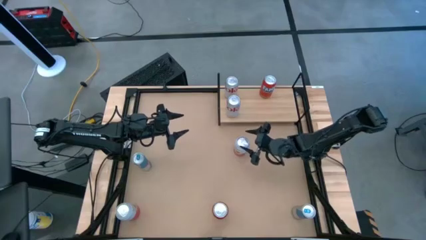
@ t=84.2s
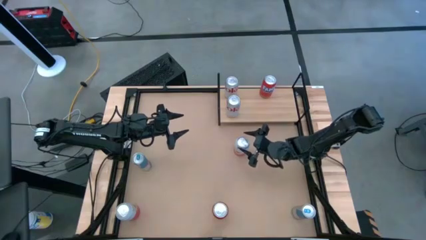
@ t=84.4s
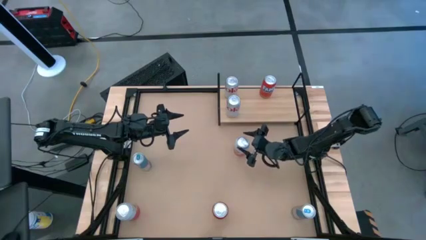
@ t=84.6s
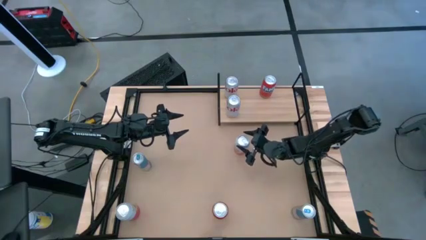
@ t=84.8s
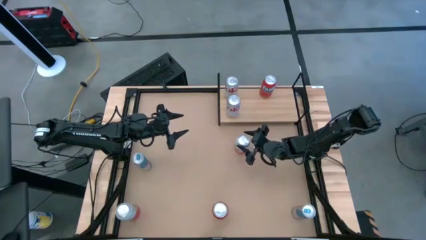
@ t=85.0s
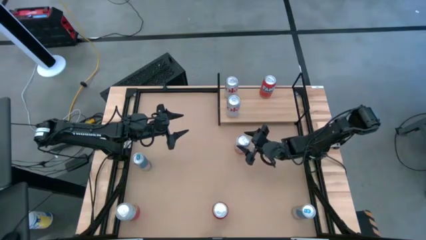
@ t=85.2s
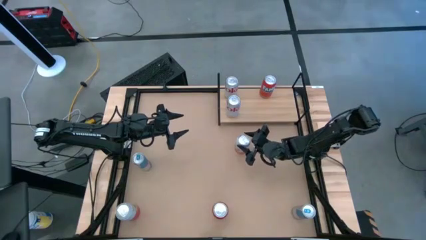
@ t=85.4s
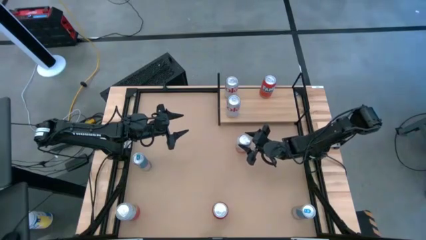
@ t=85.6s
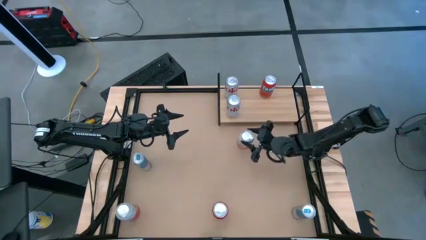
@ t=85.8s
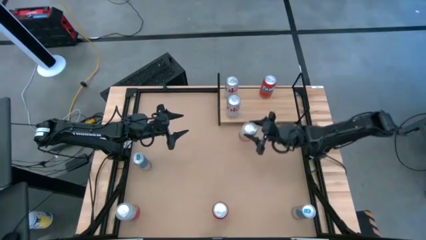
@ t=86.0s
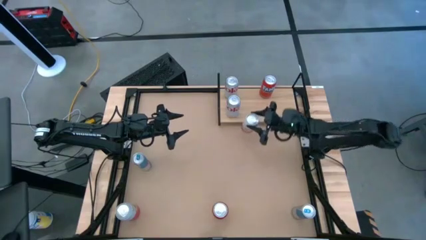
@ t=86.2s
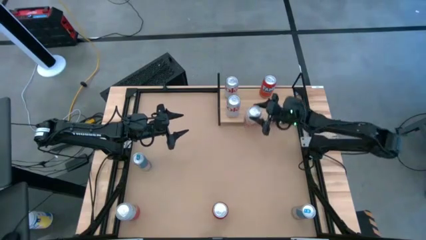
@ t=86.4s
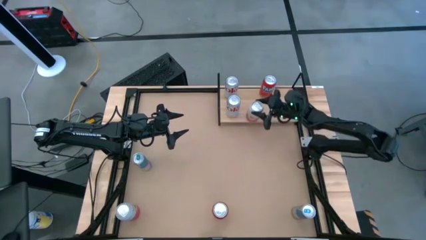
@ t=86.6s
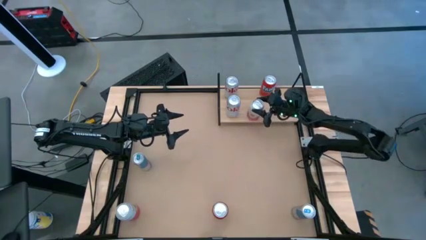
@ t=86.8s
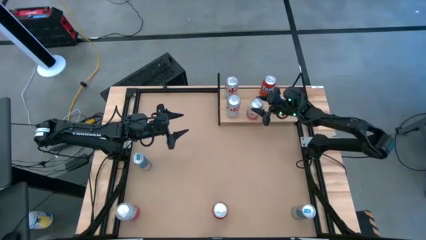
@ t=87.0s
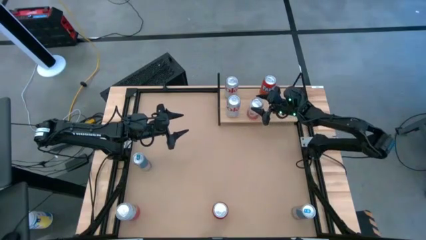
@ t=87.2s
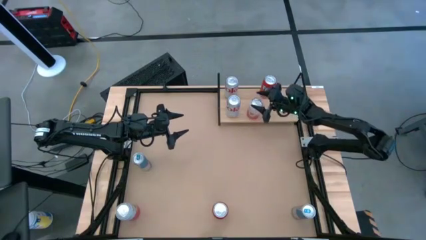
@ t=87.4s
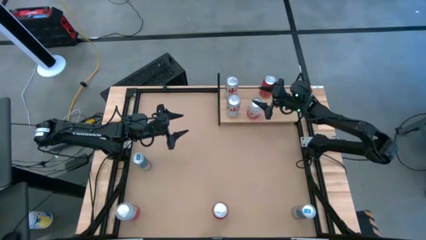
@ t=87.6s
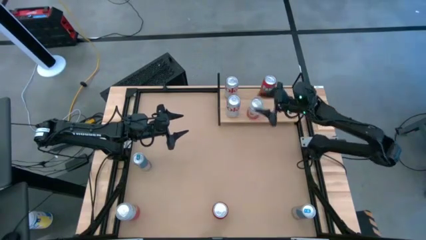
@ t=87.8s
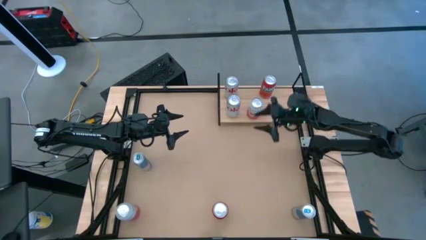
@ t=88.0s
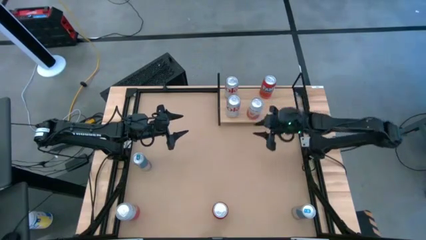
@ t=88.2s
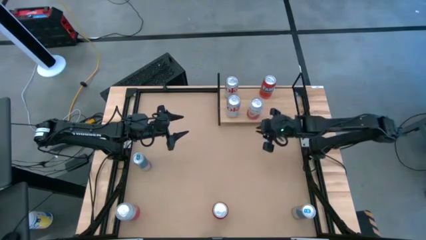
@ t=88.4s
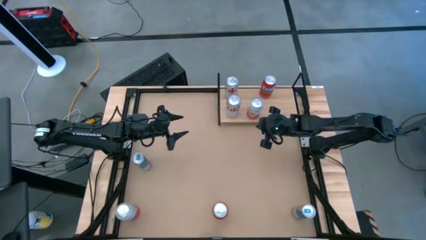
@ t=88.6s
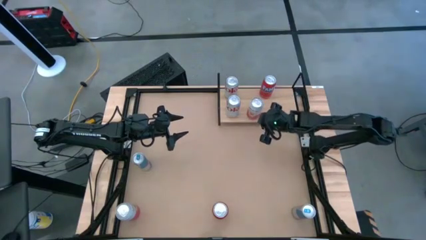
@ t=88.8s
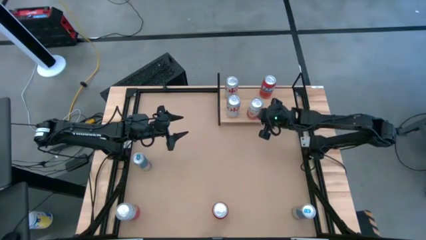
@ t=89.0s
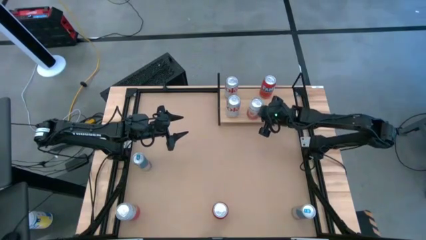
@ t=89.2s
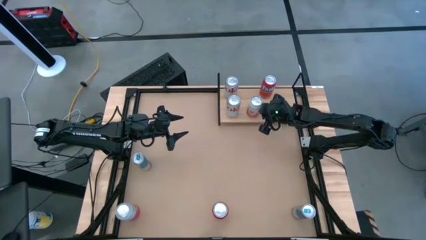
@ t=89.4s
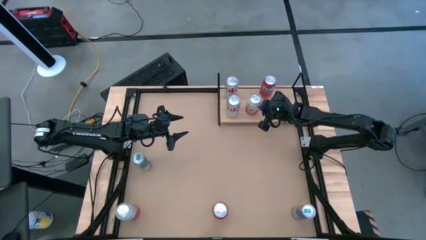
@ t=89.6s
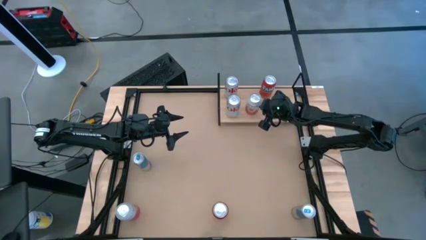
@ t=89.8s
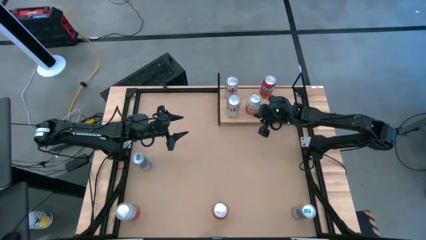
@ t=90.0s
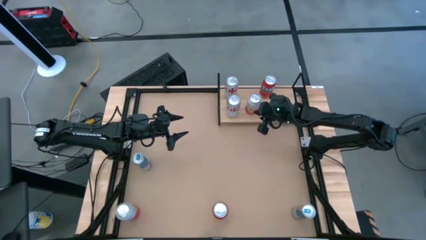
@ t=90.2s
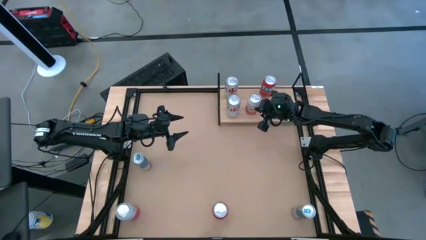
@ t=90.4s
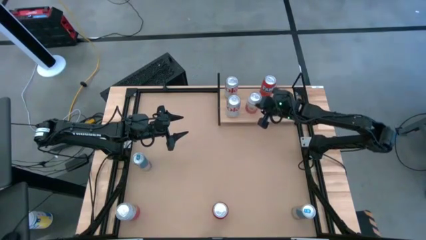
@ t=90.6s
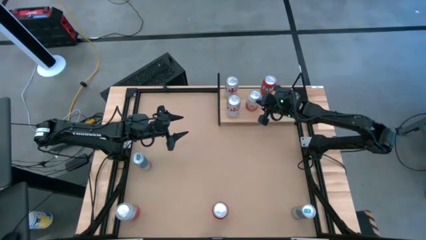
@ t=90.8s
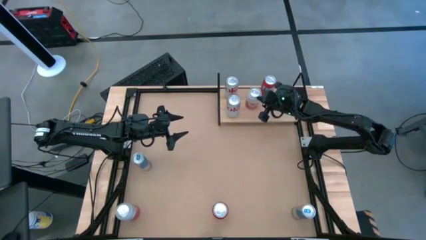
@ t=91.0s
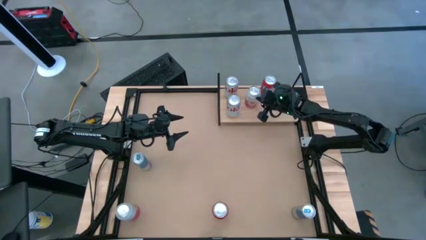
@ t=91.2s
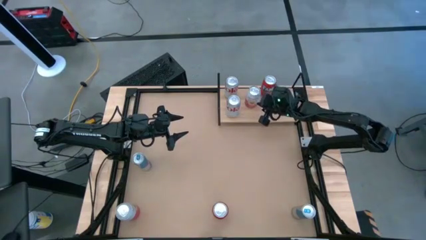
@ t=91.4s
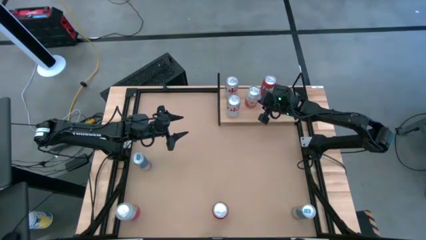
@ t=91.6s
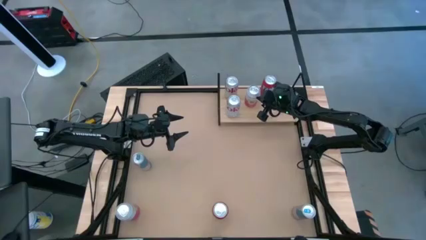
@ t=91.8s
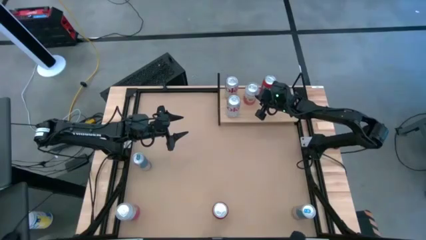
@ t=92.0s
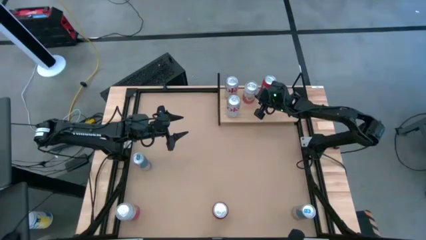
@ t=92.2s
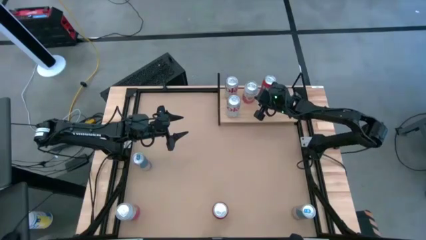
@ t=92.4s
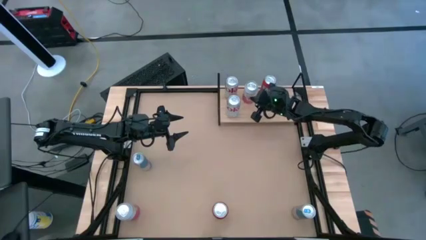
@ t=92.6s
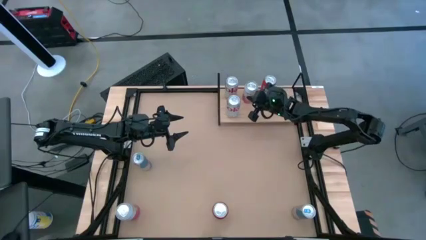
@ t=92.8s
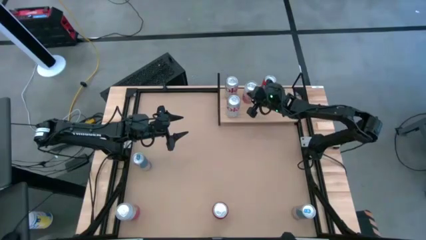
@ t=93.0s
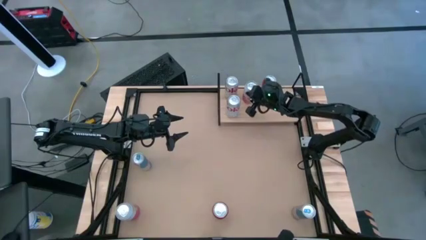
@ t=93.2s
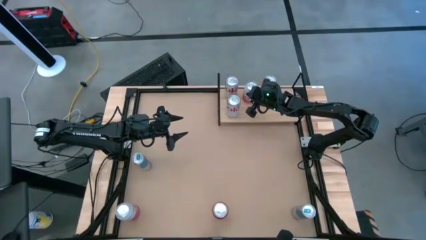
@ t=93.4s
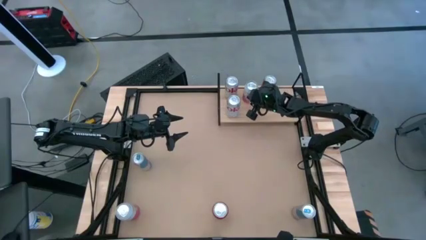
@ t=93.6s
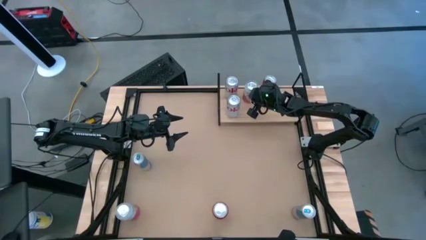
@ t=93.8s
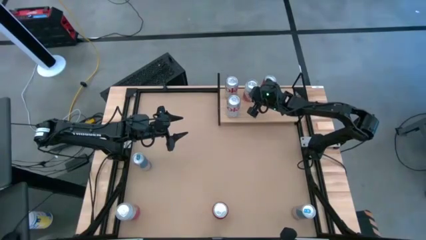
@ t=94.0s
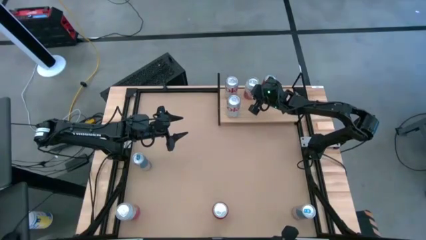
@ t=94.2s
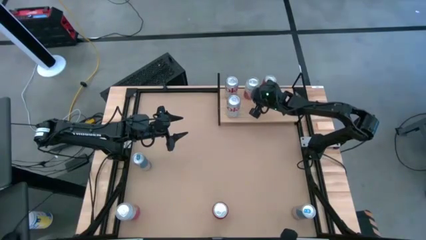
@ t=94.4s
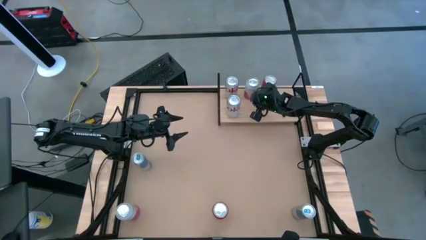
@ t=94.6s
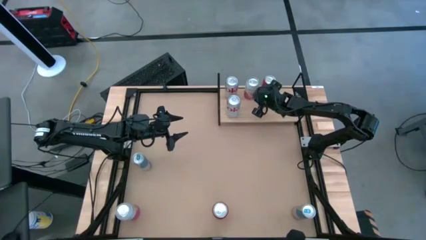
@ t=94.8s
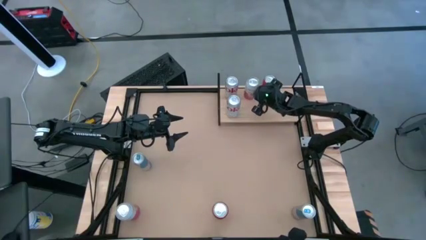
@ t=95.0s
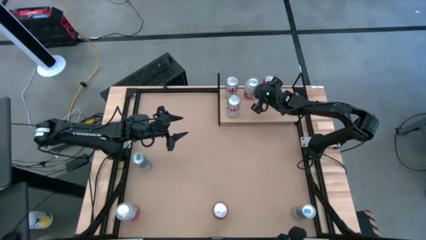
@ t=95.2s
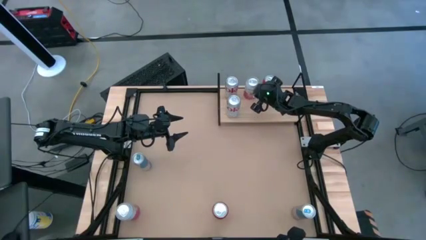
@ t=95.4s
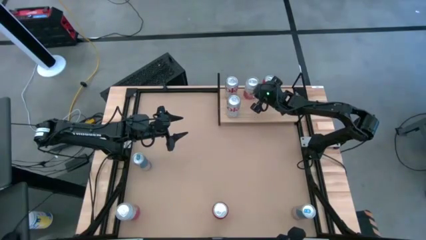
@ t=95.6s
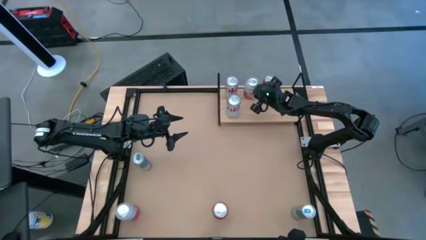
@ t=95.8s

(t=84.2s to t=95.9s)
Task: Place canned beverage on shelf
Put the top pink-white soda can on the shelf

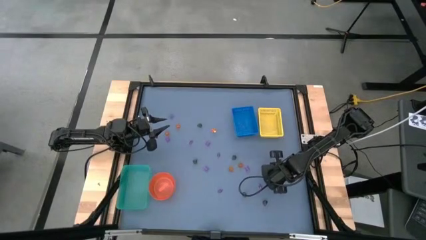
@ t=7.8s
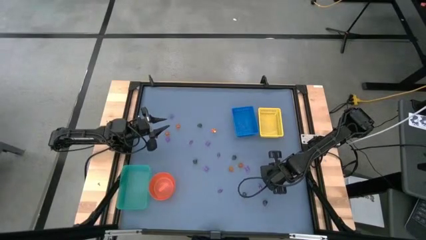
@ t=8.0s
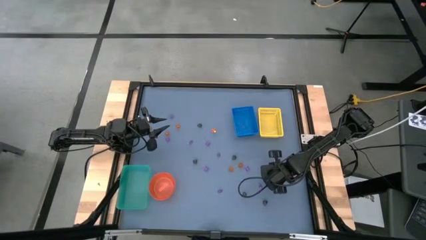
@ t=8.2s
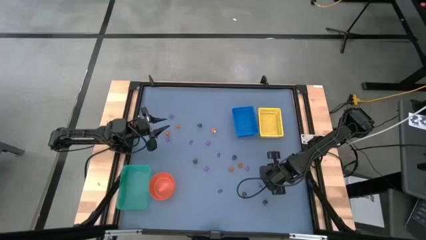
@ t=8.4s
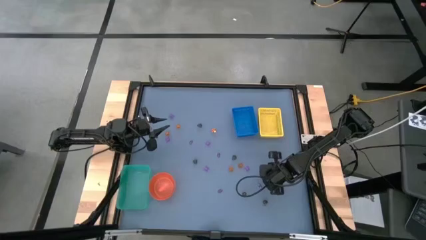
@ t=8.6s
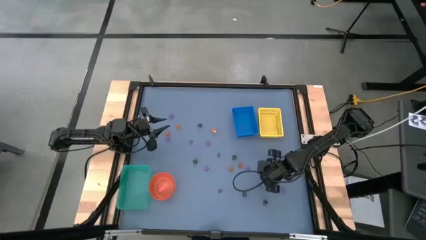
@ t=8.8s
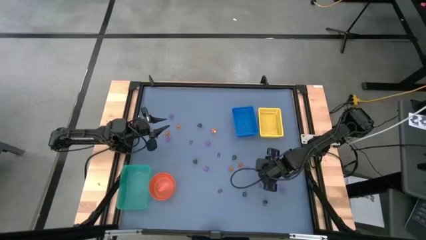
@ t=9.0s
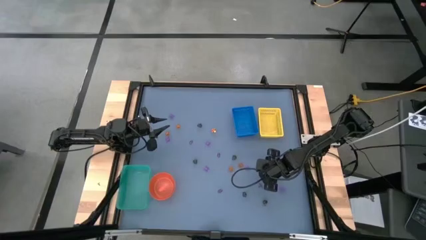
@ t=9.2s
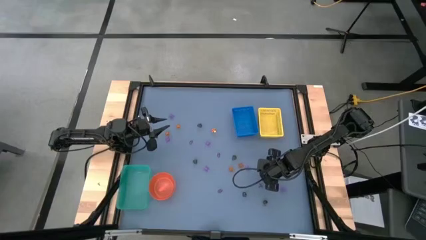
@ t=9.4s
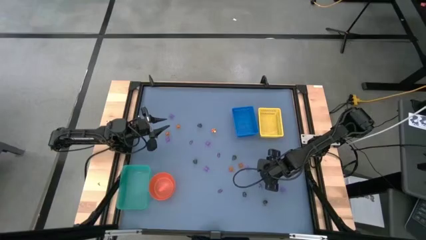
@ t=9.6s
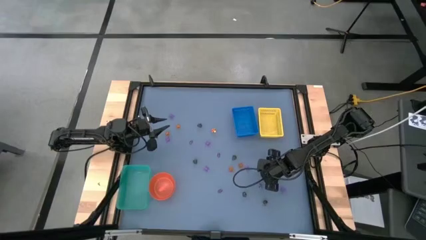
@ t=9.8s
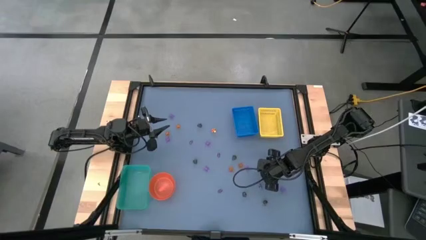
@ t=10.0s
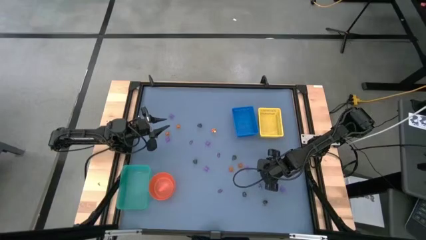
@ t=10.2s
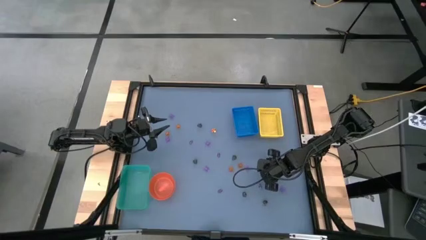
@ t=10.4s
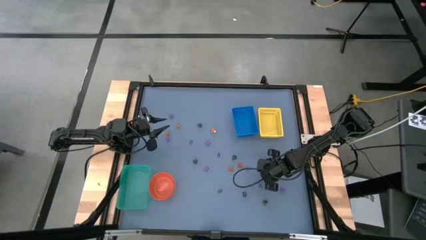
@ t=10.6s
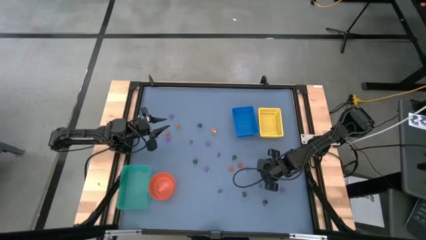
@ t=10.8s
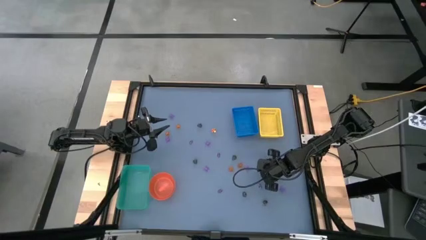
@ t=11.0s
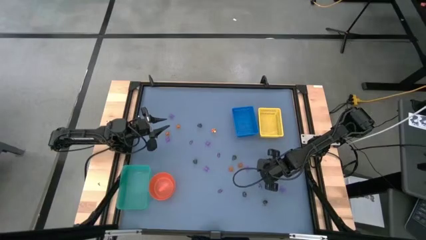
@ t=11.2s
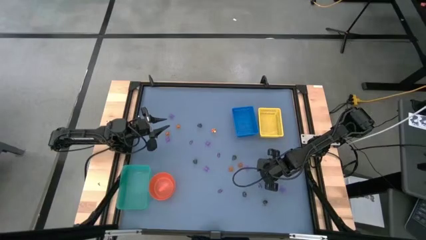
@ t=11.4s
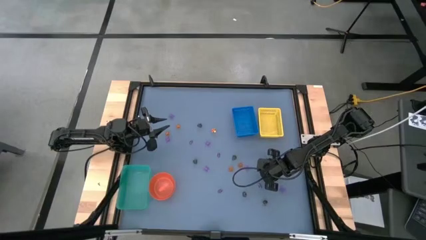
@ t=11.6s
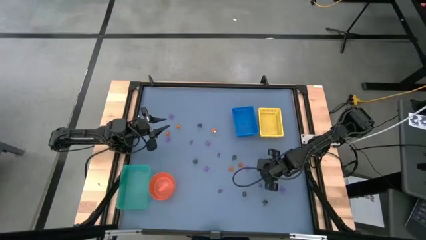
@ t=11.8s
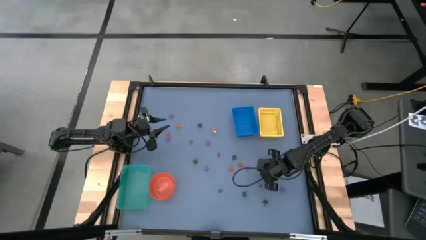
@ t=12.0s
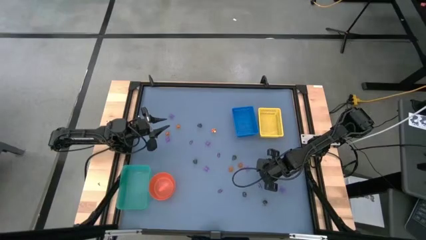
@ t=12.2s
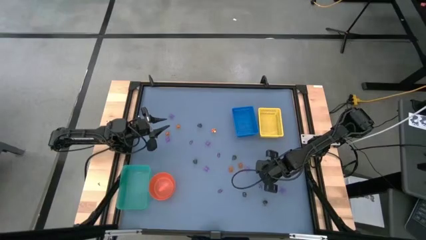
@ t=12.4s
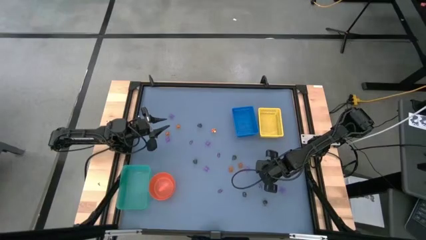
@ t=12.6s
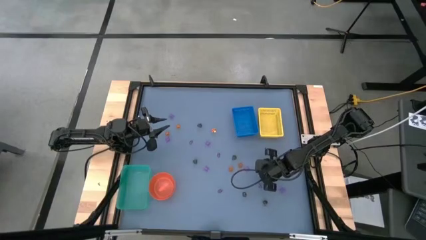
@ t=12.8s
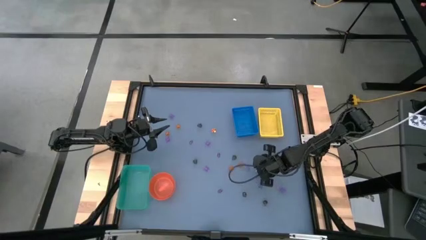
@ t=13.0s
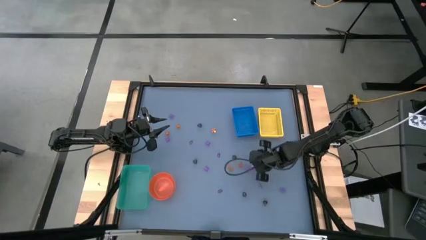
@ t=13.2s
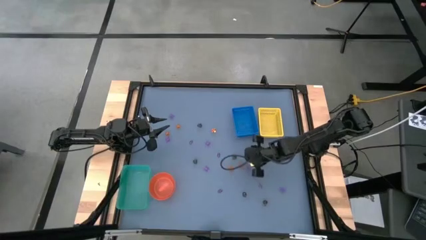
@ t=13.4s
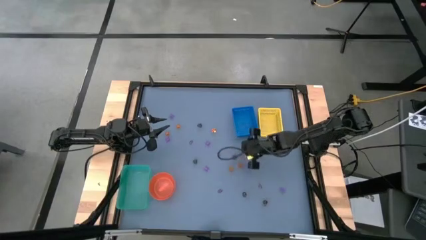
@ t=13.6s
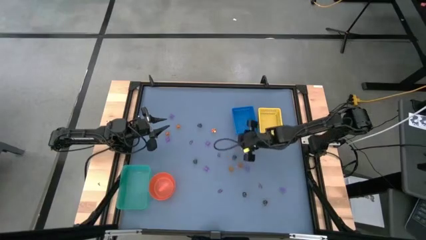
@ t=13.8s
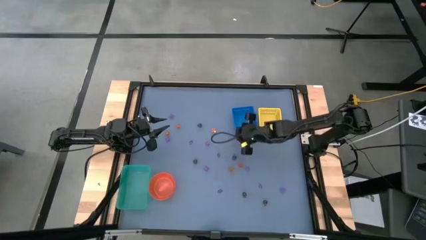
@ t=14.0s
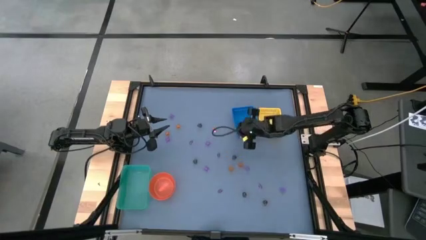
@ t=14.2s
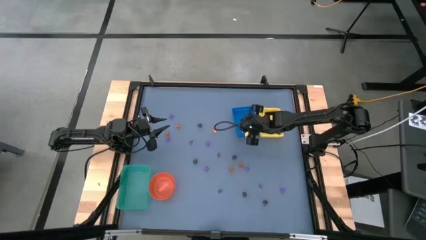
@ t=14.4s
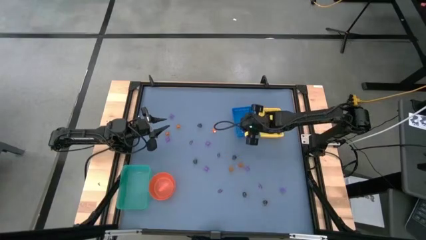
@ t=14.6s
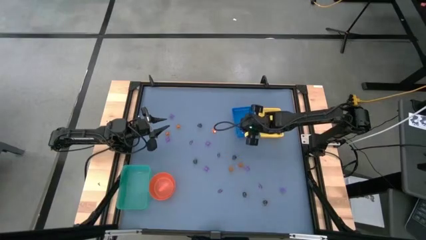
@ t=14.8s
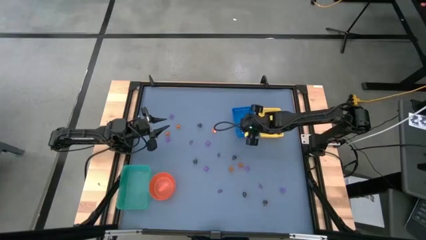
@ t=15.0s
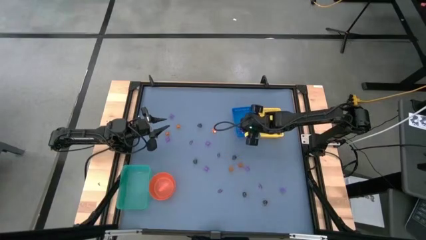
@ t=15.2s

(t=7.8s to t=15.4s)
Task: Sort Halloween decoration
Put the violet spider toy into the blue box
